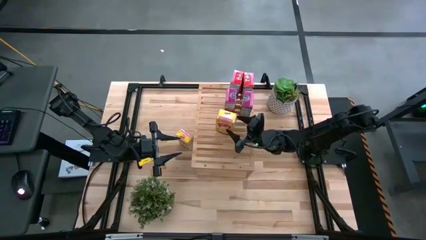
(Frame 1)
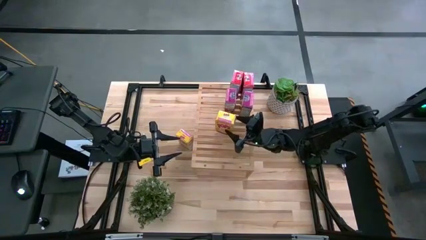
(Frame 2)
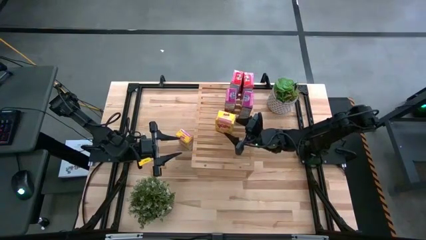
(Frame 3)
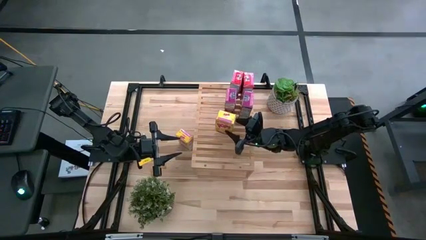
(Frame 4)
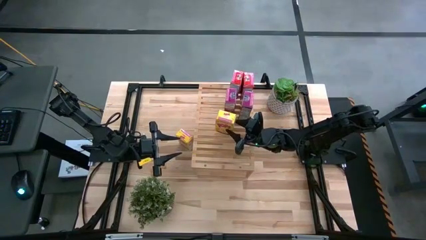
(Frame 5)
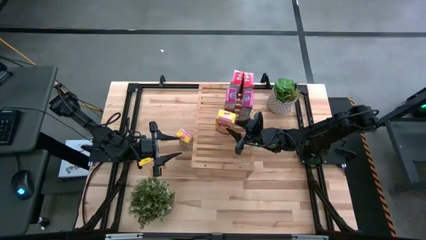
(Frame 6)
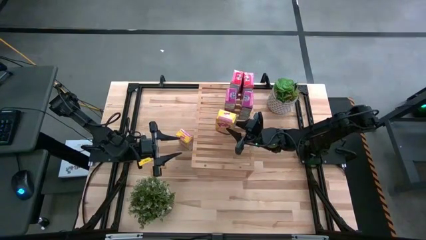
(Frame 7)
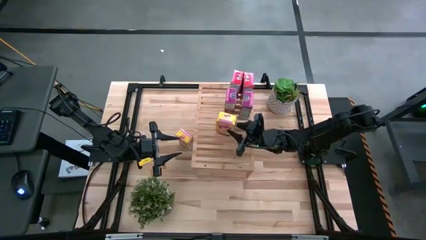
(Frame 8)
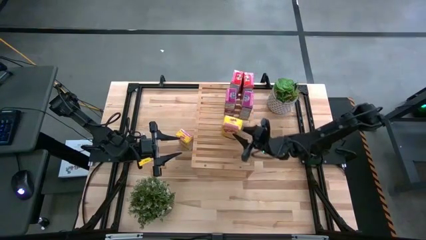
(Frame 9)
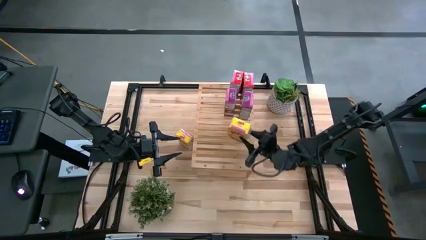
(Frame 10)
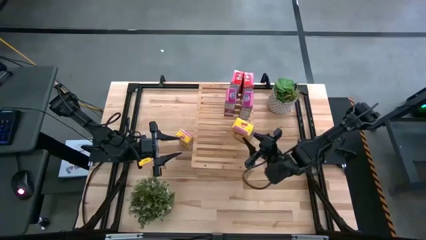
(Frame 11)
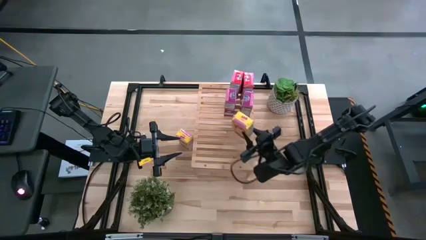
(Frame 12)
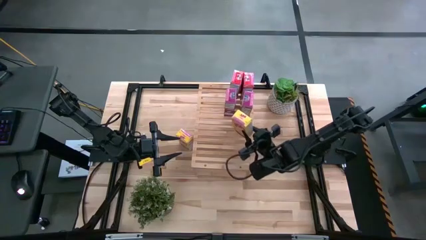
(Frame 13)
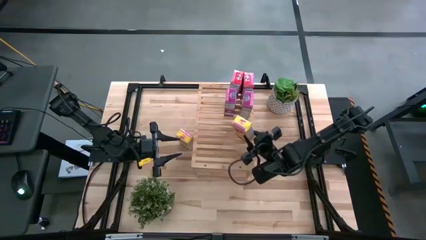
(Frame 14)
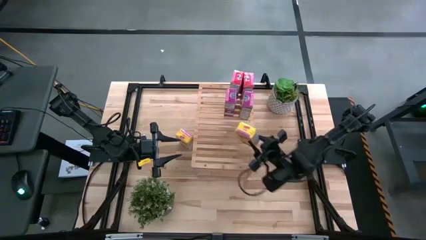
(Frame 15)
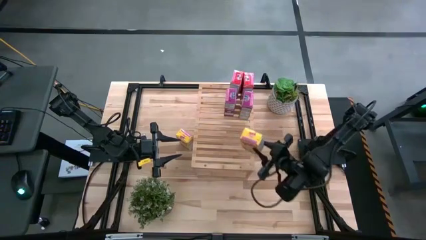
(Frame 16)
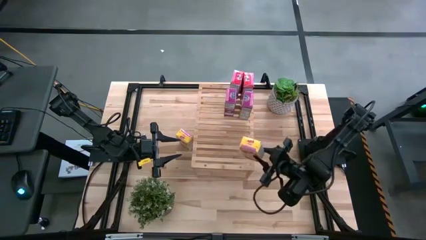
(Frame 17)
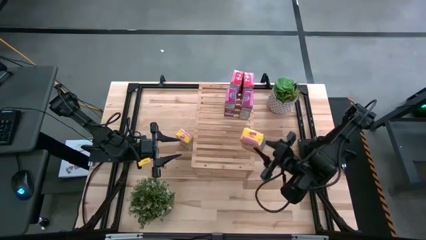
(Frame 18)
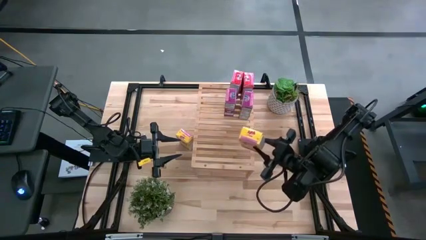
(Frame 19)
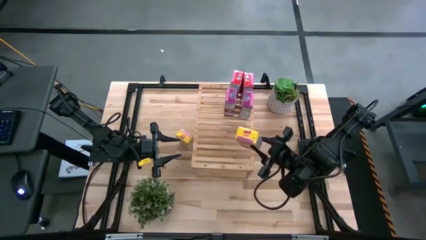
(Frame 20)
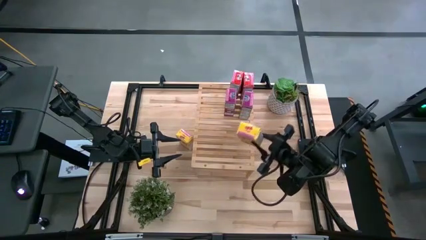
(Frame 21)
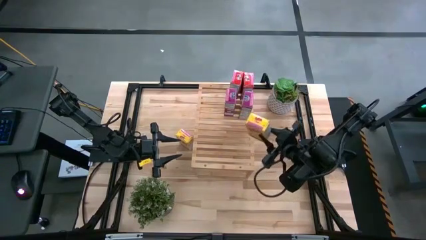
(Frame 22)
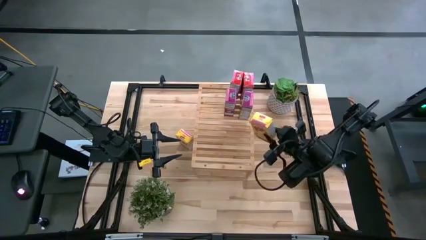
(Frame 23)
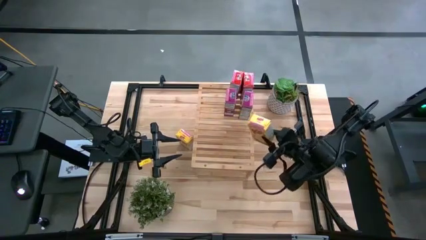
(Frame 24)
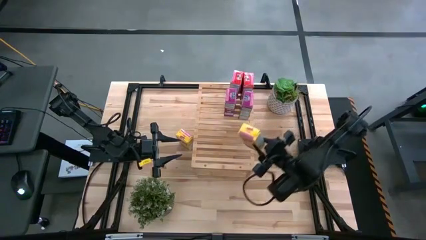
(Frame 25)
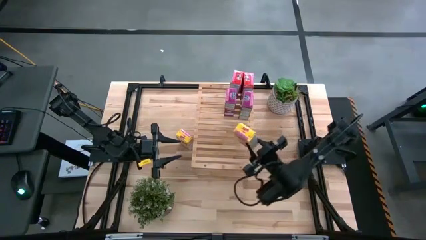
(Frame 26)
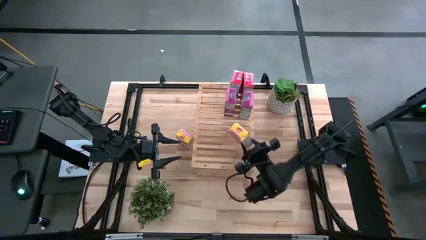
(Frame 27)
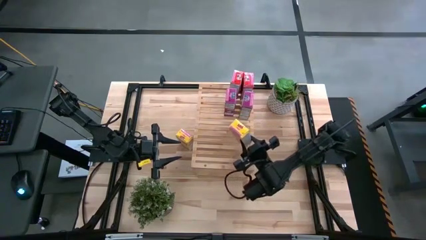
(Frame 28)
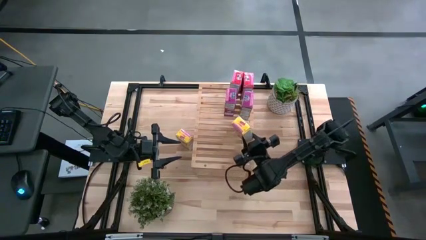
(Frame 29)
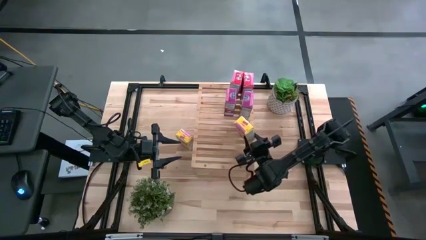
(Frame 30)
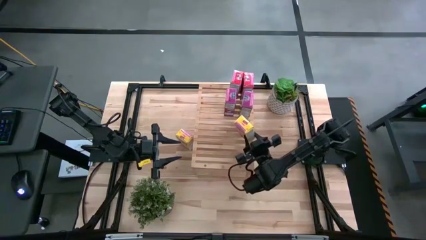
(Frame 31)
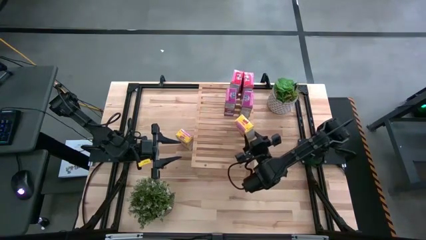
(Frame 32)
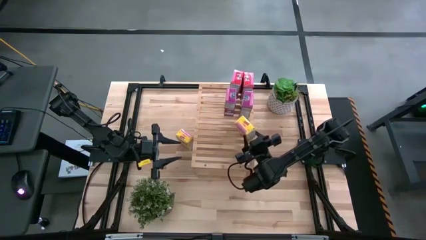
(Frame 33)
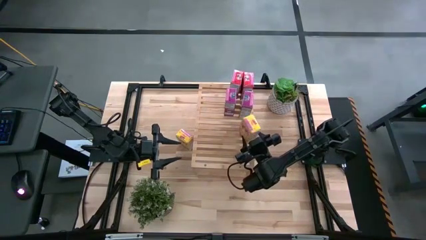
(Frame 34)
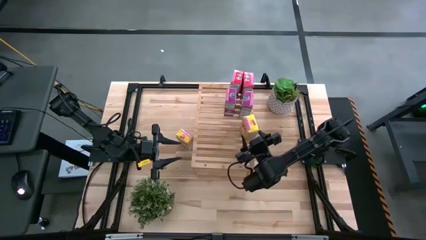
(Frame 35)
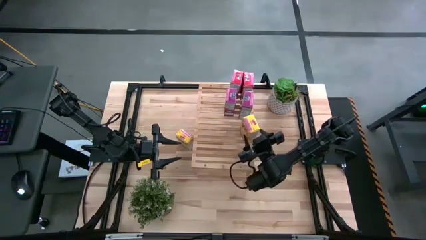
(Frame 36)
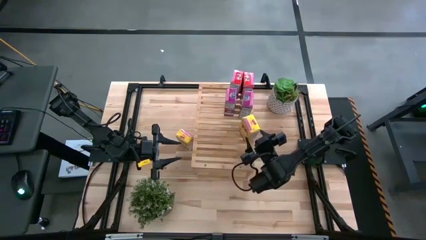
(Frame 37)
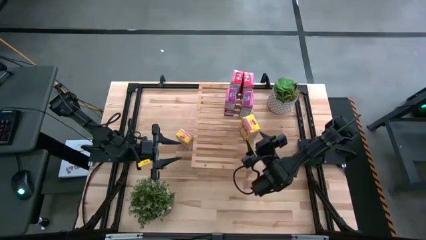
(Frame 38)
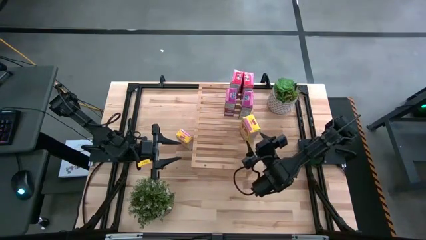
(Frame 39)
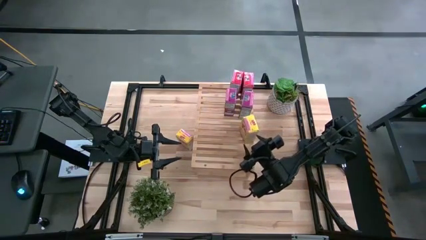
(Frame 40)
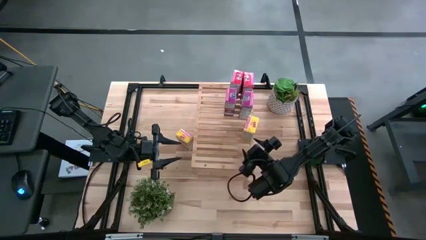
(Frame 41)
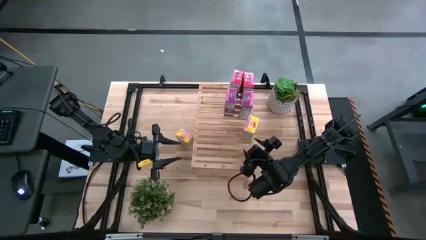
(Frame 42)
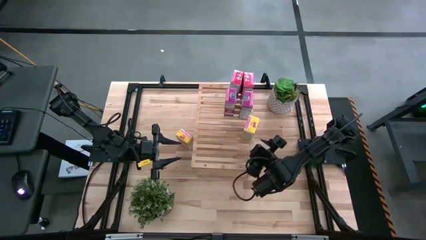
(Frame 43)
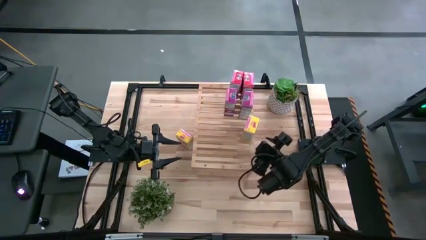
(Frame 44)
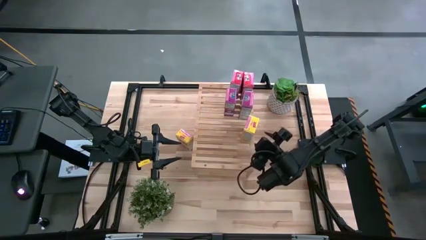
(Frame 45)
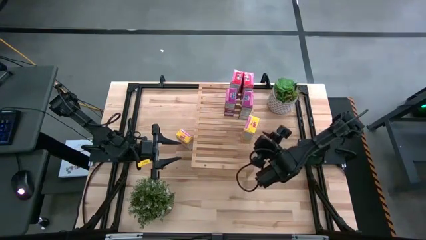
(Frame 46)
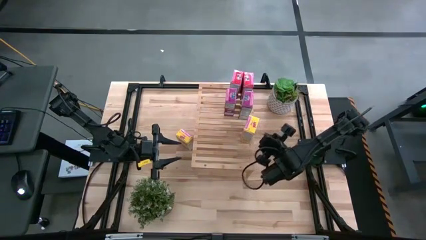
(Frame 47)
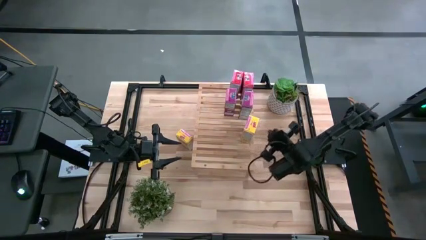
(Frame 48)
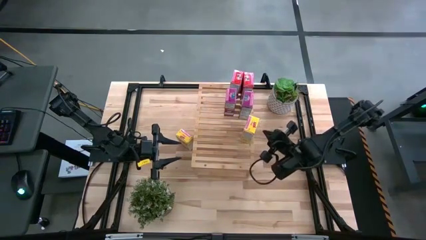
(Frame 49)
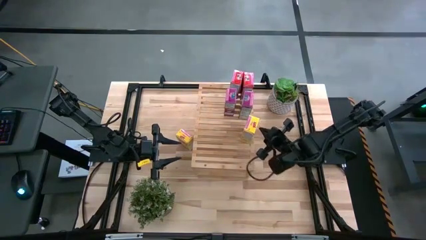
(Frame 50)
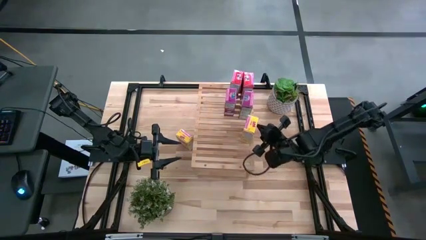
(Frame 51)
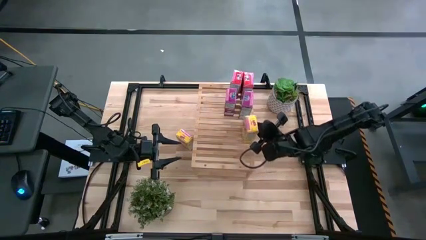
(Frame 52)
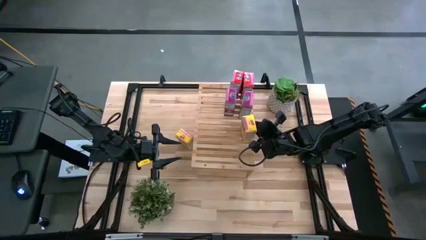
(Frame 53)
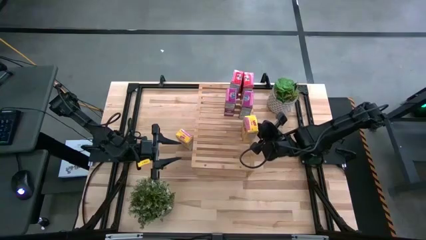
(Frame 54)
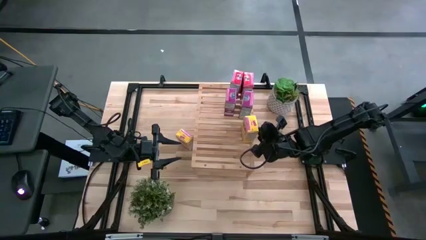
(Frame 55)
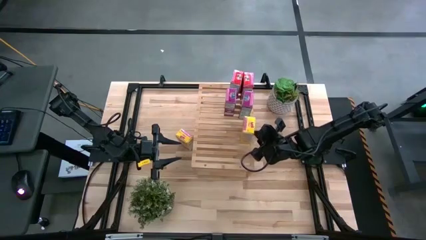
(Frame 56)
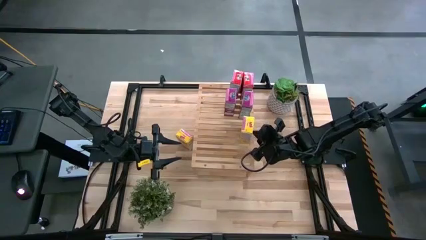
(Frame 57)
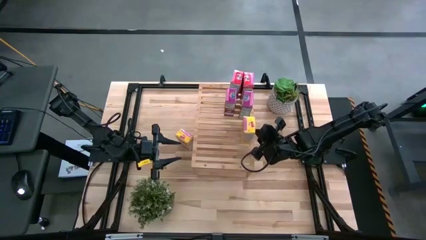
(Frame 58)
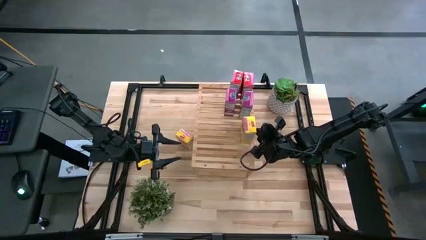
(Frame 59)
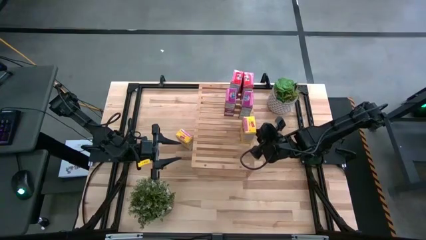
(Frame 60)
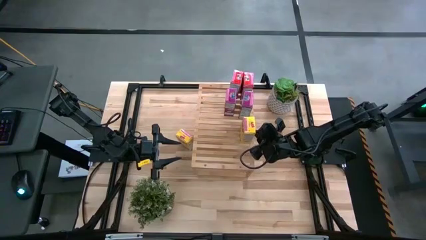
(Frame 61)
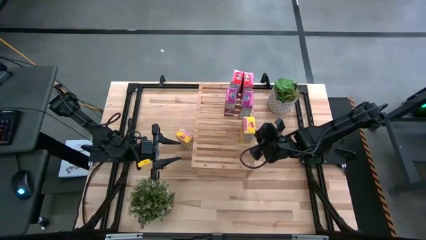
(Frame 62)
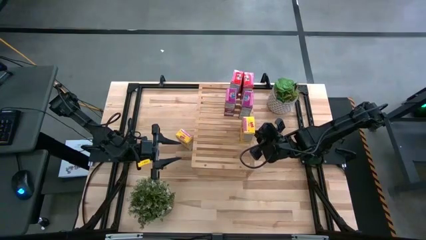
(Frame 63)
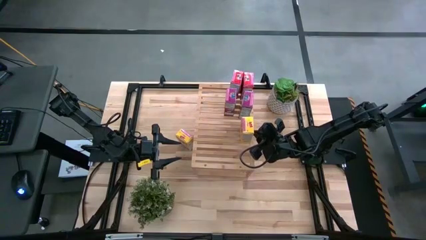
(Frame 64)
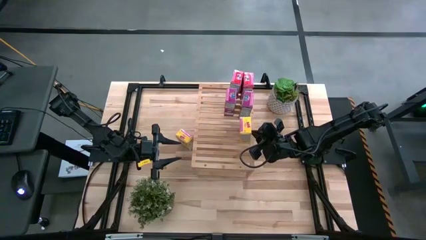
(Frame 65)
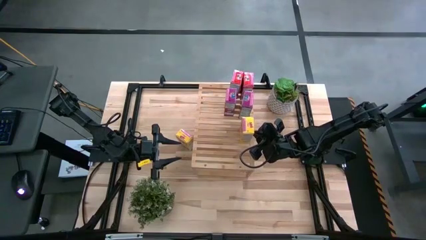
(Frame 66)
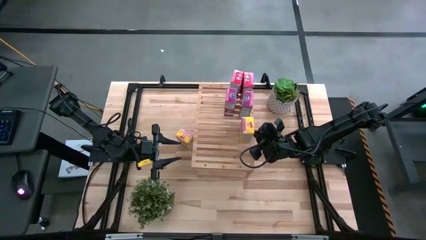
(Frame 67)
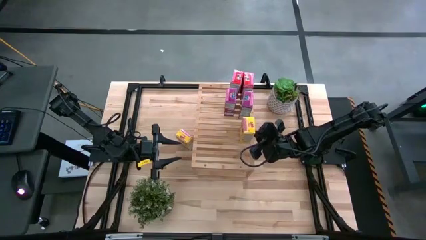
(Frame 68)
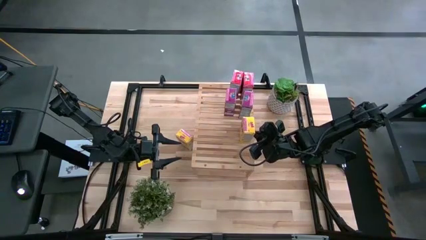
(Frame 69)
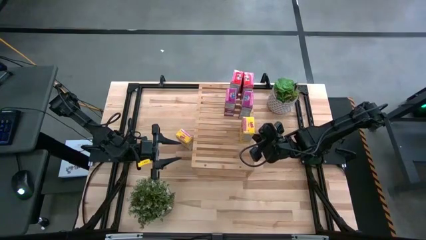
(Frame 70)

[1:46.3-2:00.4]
Task: Stack cereal on shelf
Put the bottom yellow cereal box on the shelf

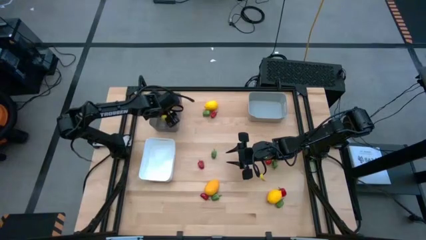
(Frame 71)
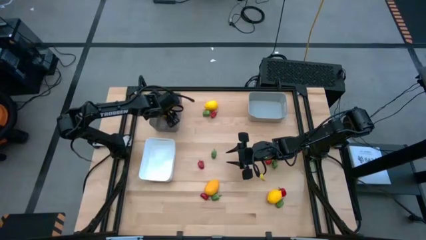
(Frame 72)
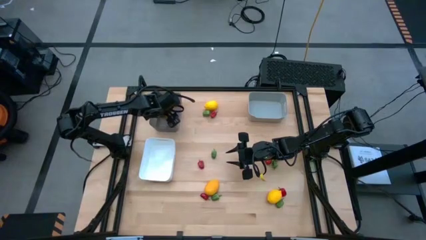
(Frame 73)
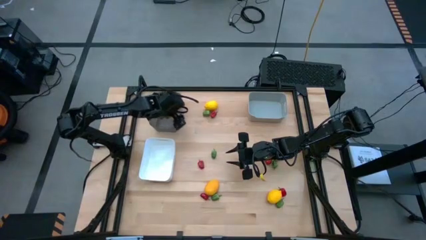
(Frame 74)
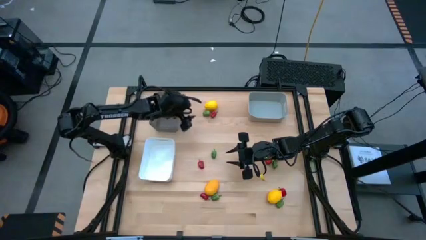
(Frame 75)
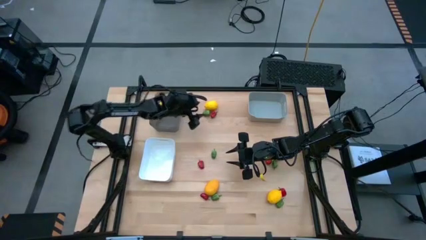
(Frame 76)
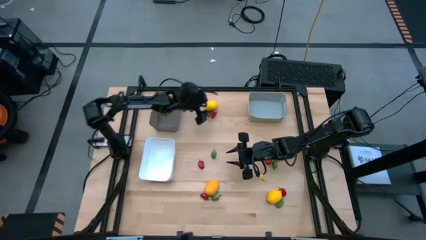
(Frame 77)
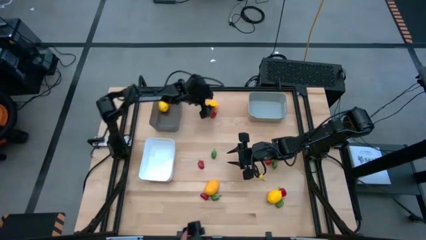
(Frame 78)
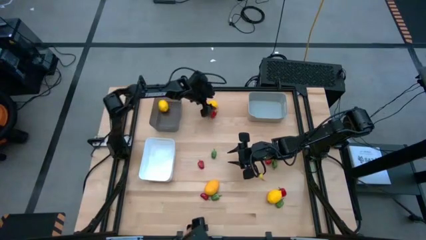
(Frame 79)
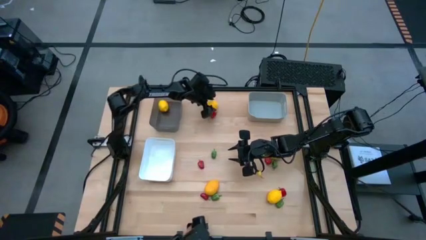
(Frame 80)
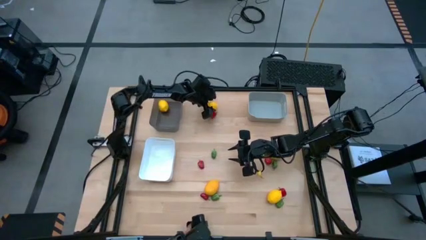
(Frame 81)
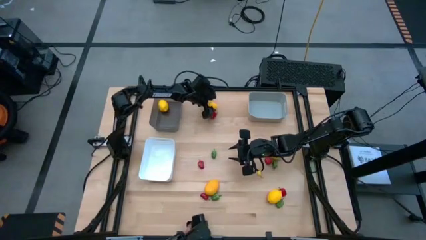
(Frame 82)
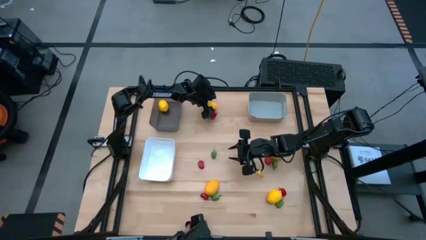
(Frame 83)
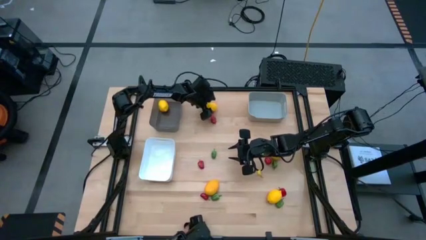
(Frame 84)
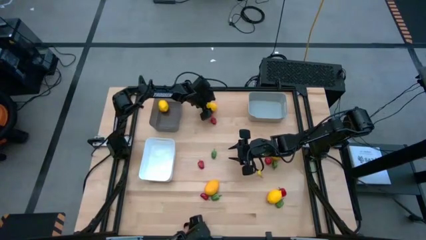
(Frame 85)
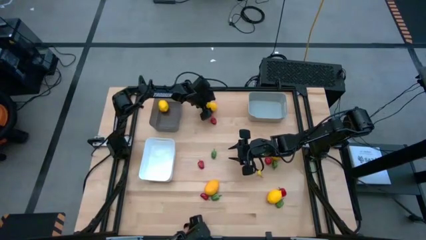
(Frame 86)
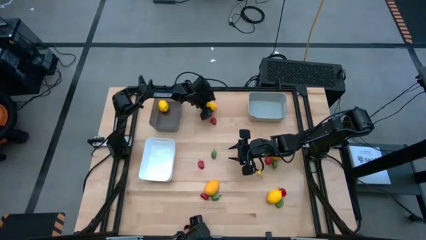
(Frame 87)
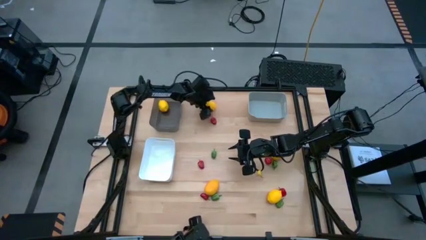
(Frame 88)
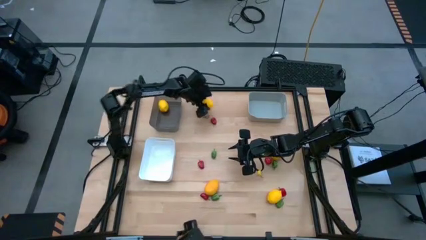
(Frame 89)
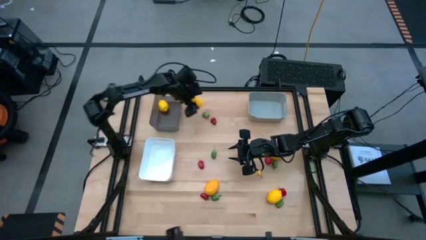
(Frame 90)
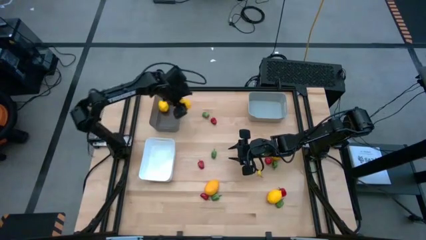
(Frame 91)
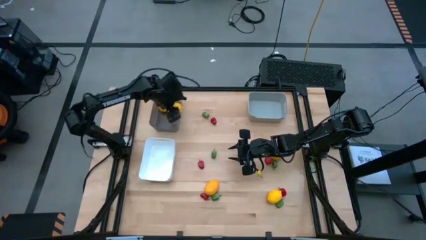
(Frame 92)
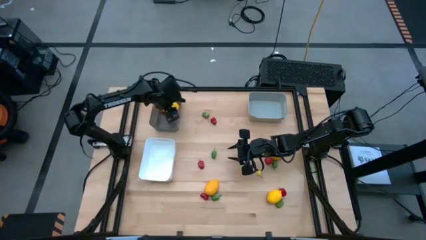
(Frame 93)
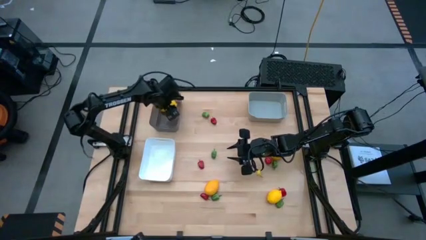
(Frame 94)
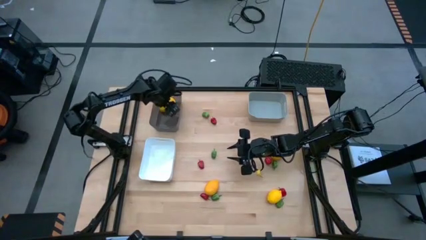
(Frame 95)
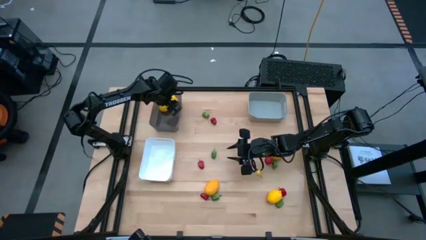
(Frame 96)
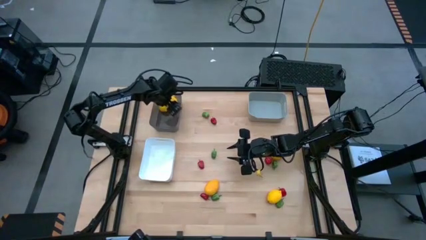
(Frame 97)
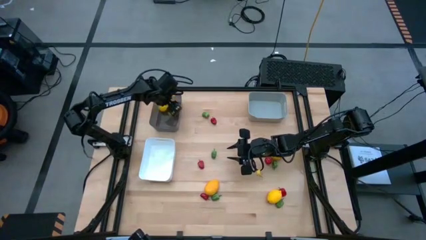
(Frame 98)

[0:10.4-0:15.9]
Task: Sort produce into baskets
Put the top left yellow lemon into the black bin
